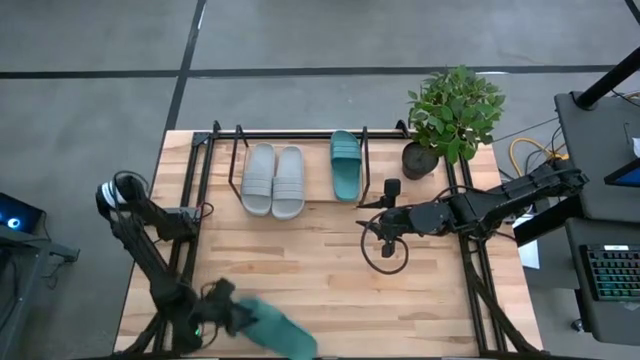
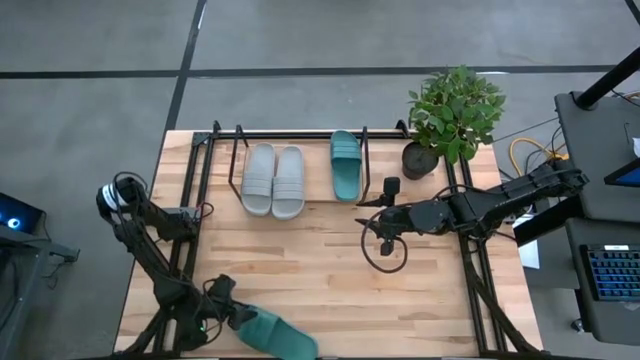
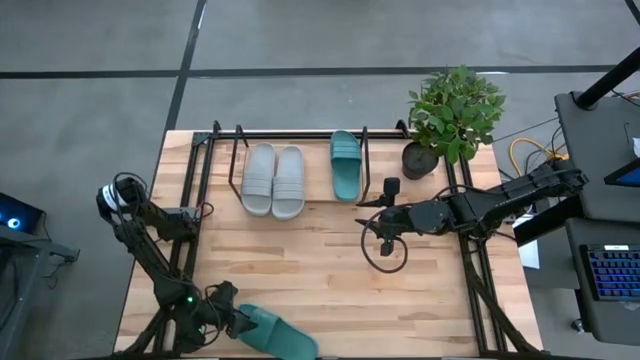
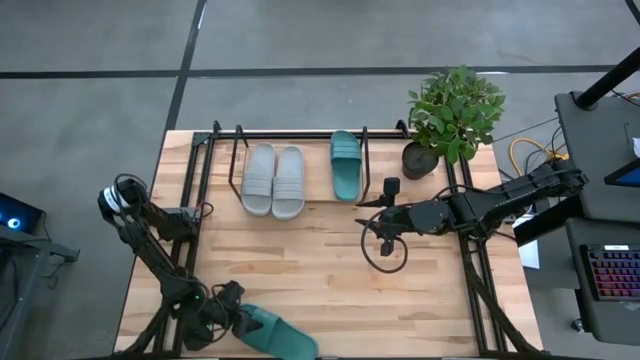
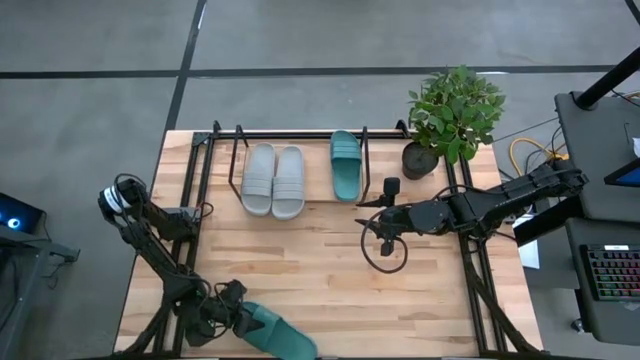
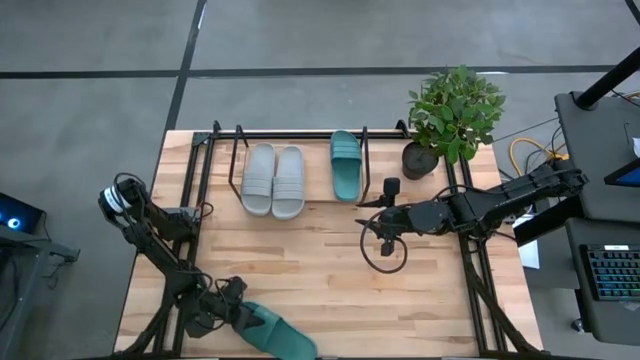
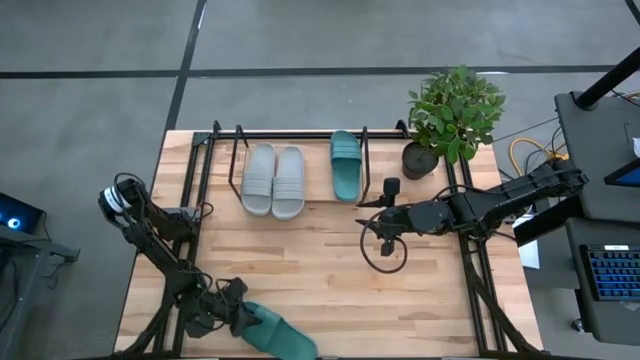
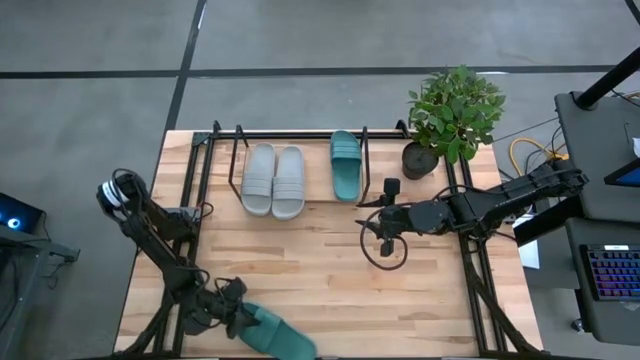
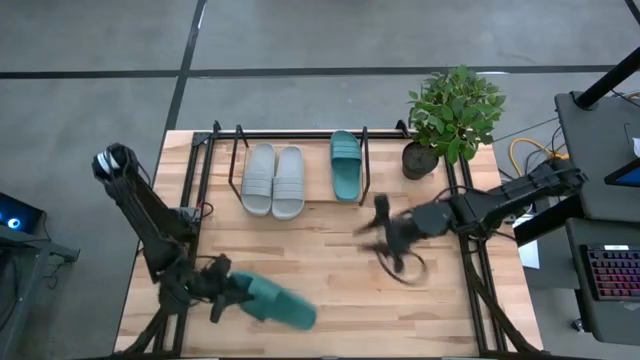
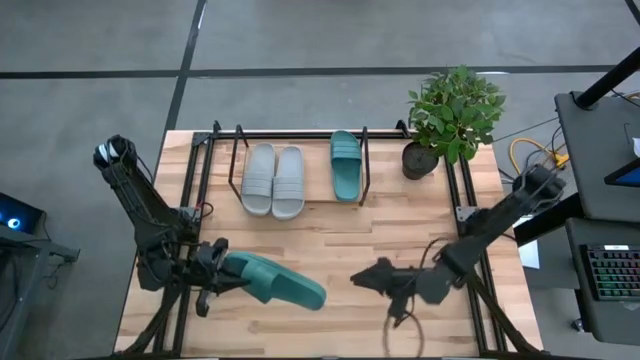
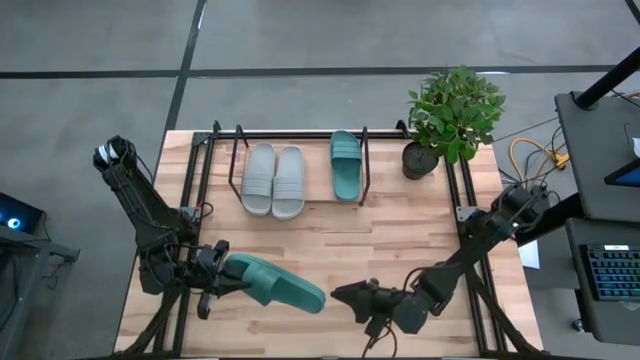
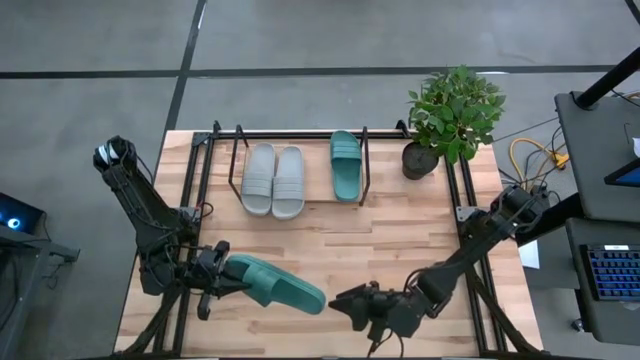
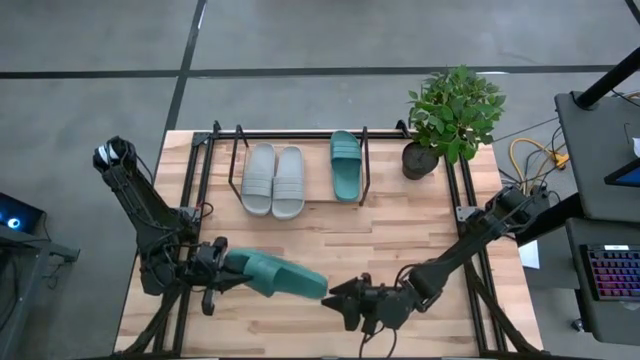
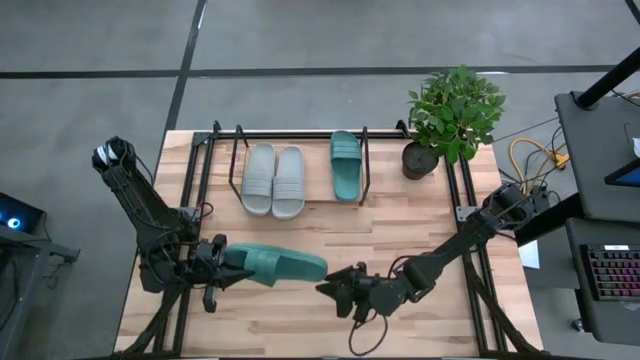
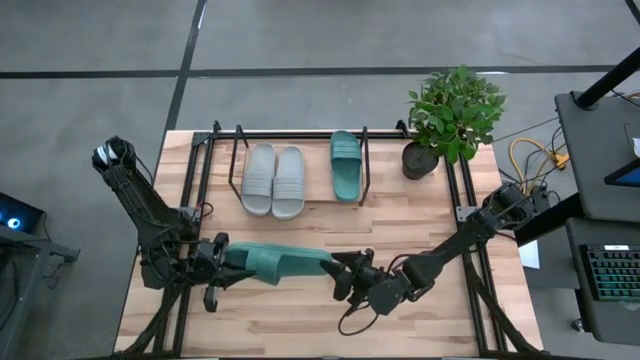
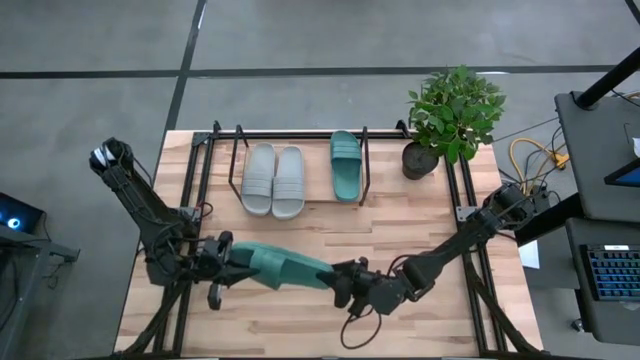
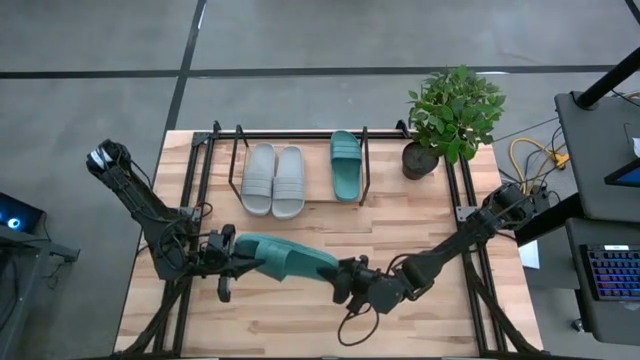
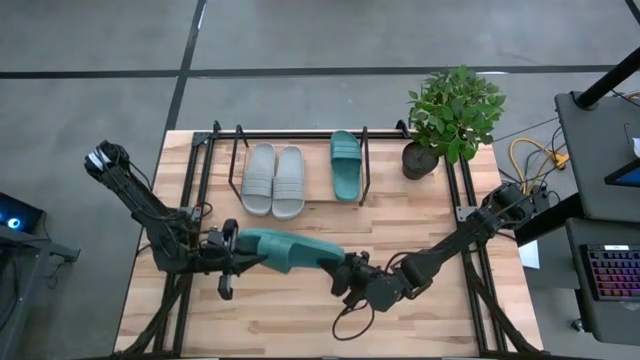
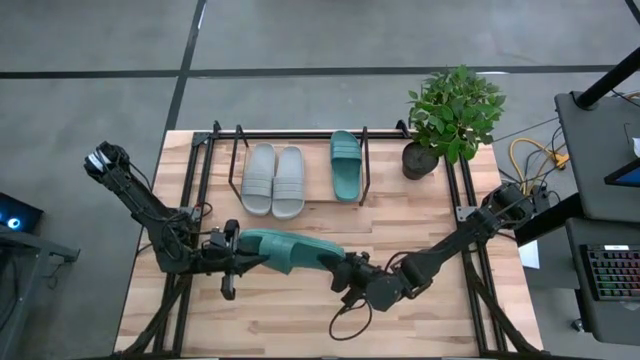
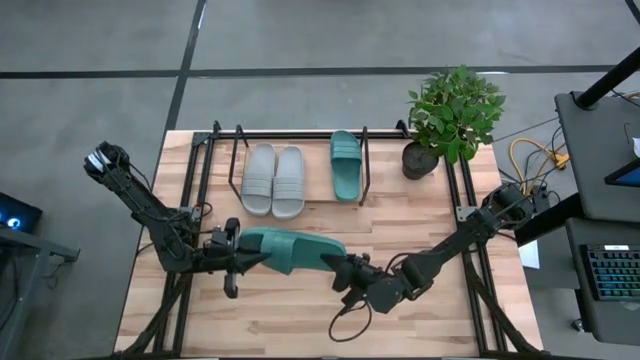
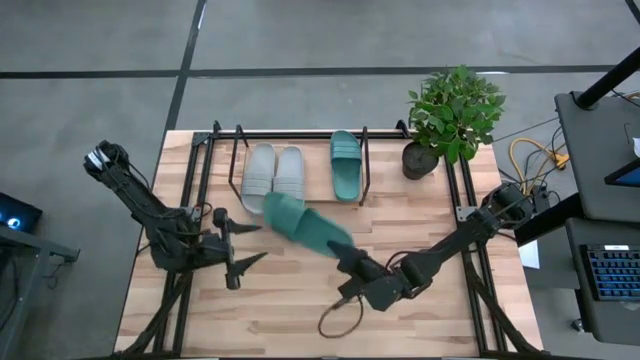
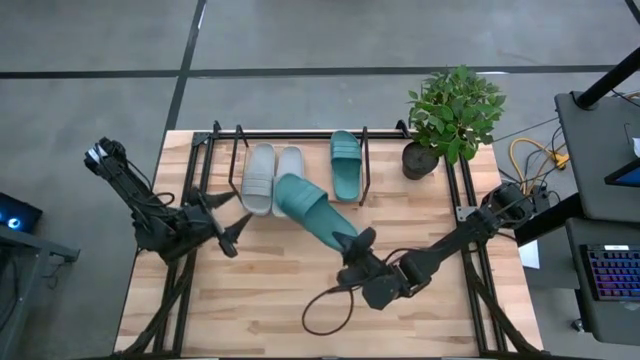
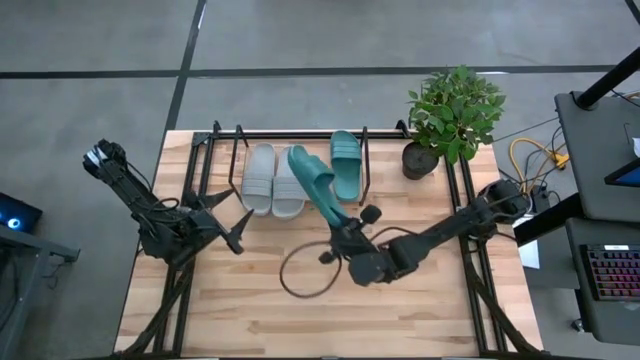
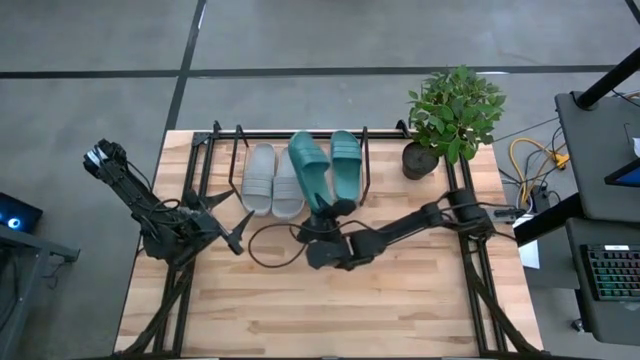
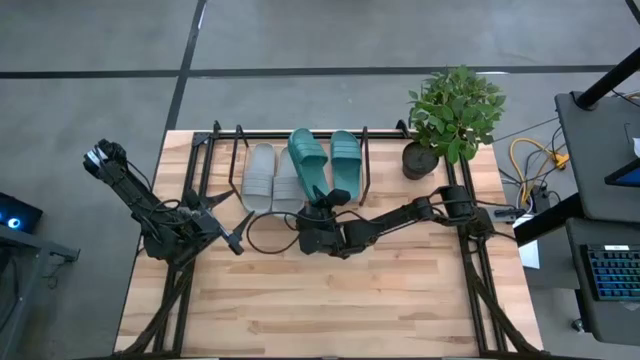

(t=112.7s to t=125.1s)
Task: Pick and place slides into the shelf
Put the left green slide on the shelf

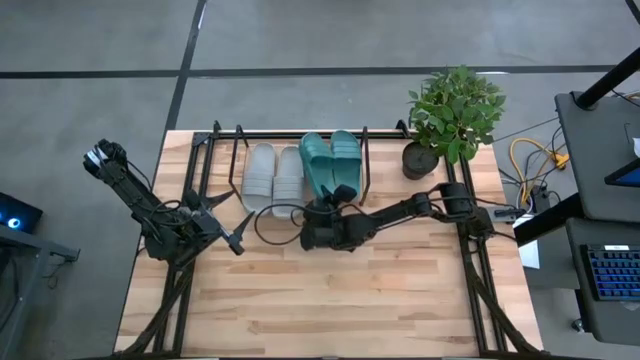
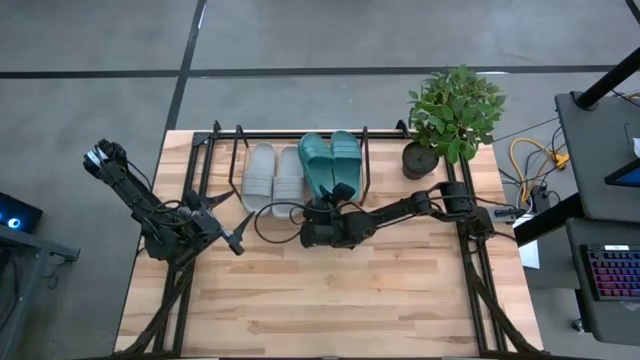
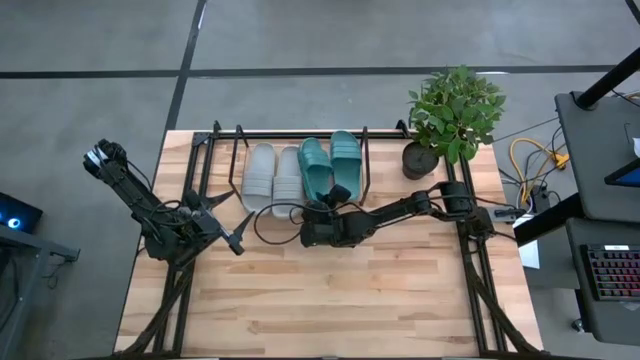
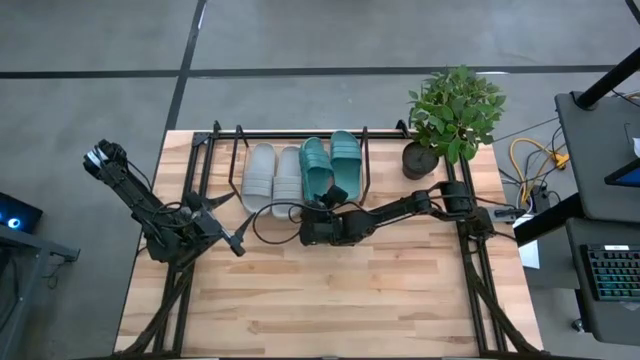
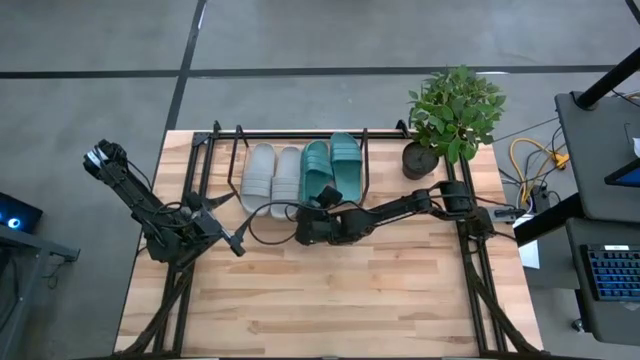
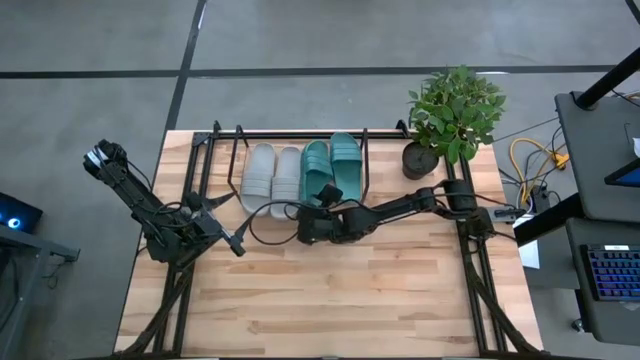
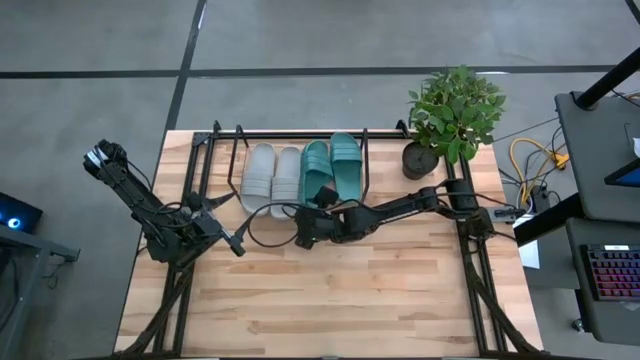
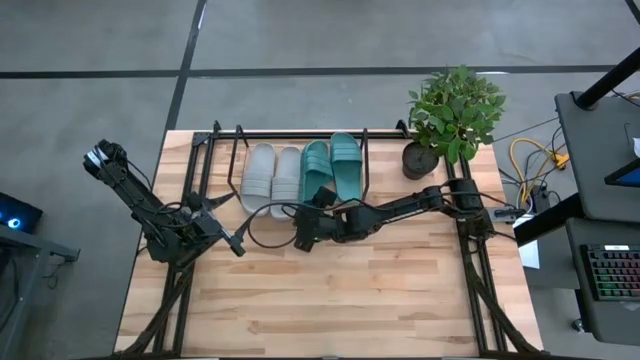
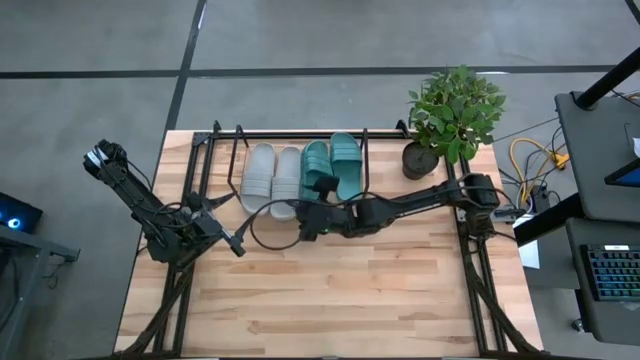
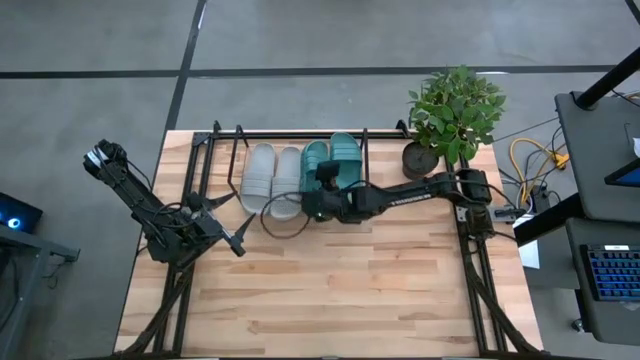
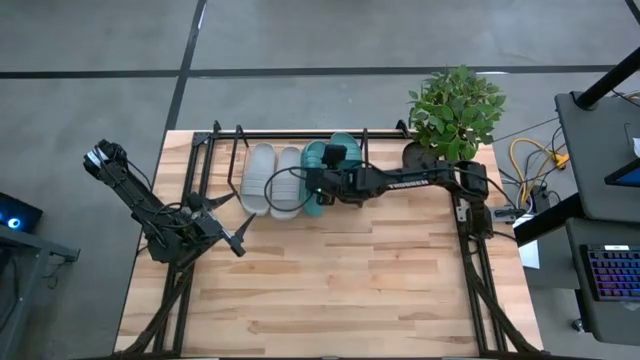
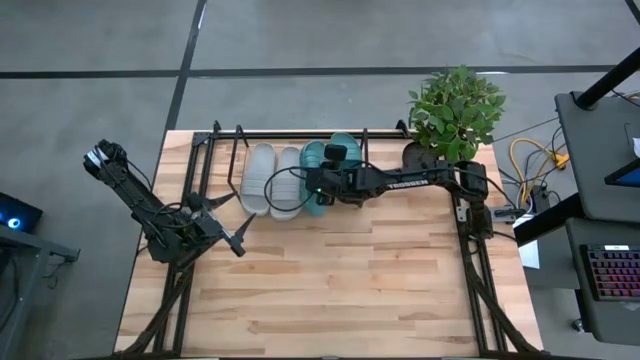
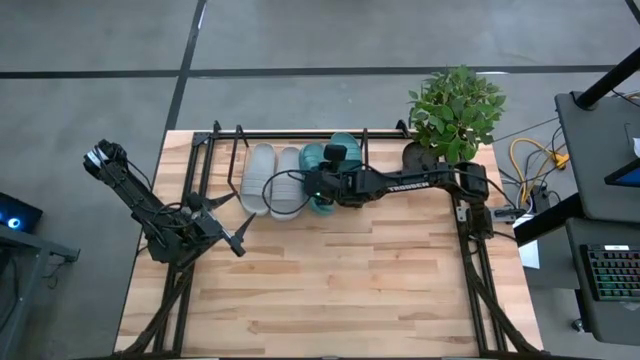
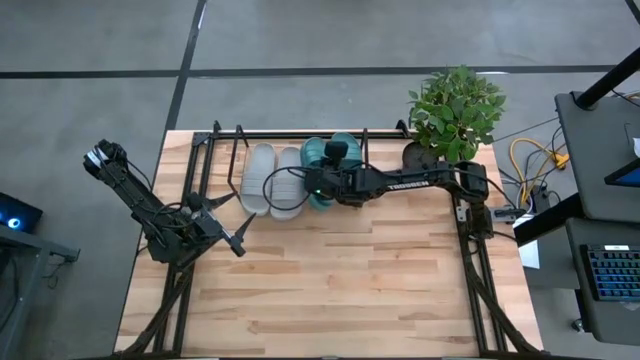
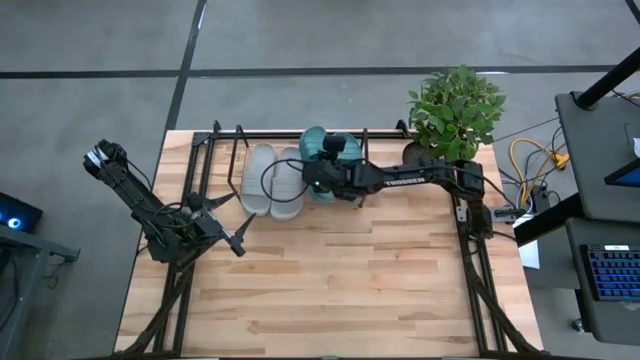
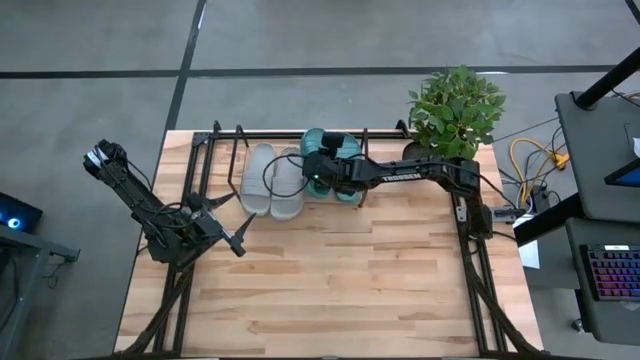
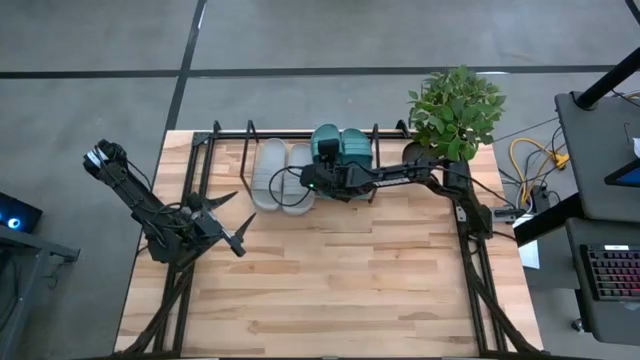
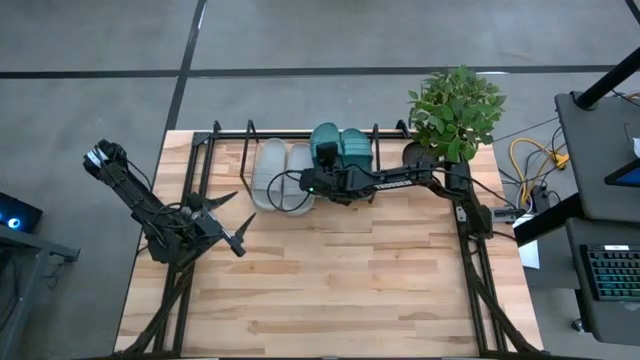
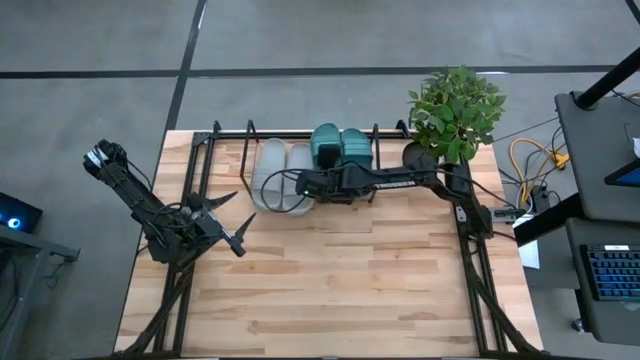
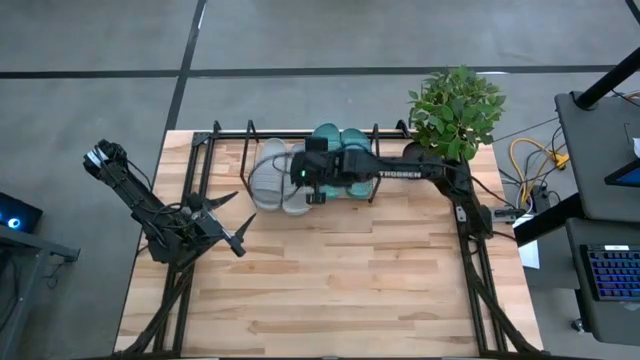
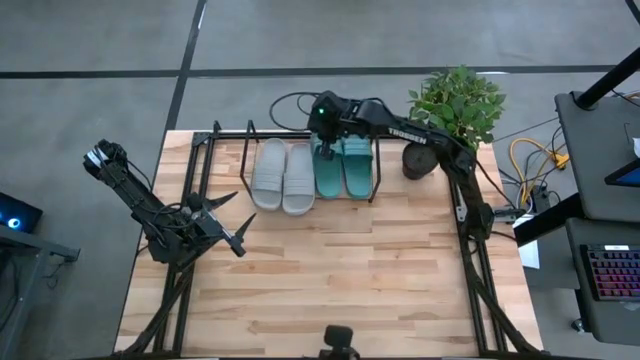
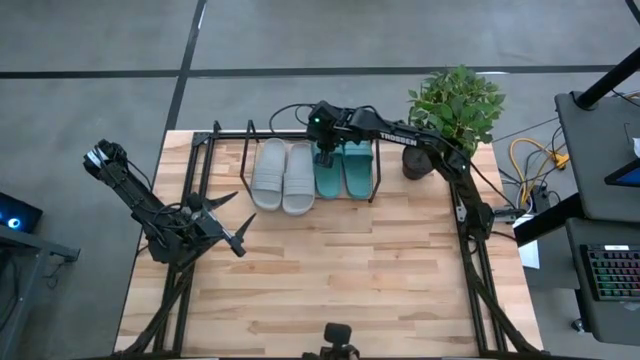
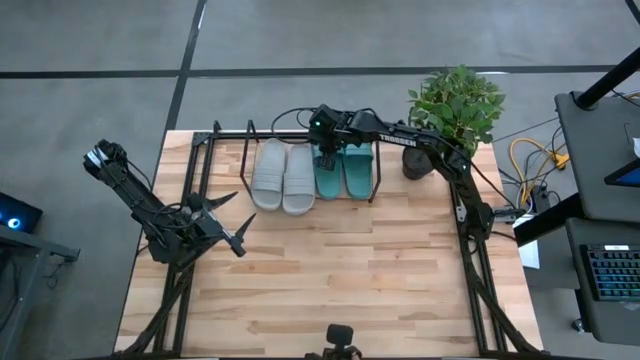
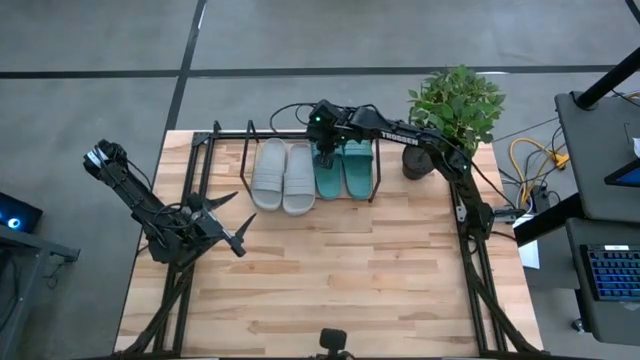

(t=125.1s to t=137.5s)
Put the left green slide on the shelf
